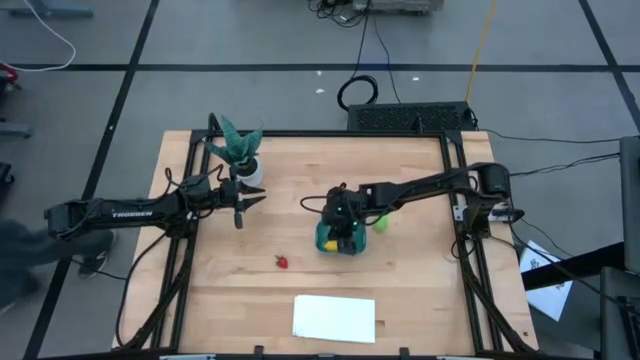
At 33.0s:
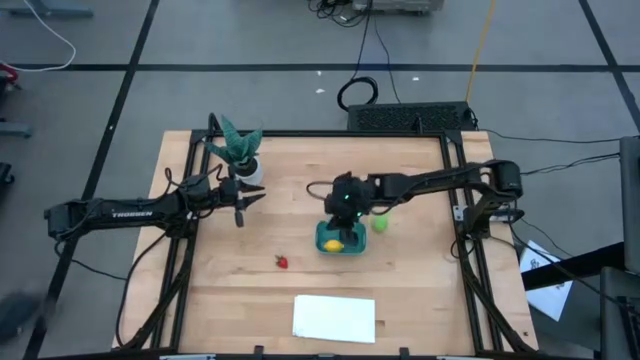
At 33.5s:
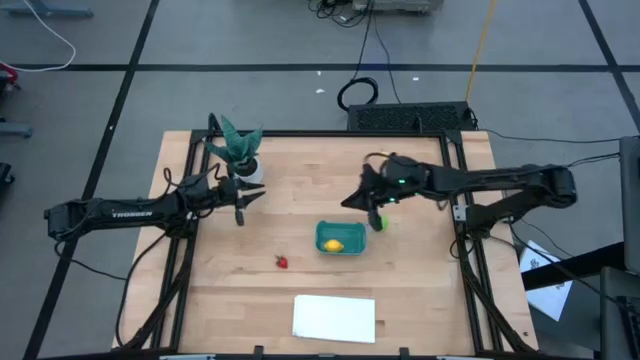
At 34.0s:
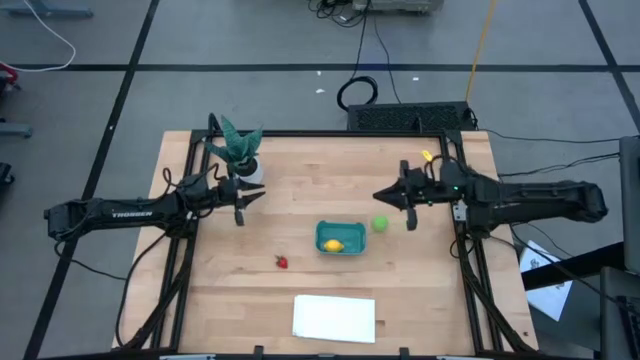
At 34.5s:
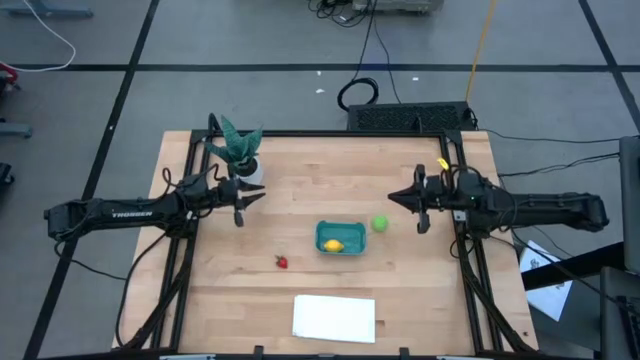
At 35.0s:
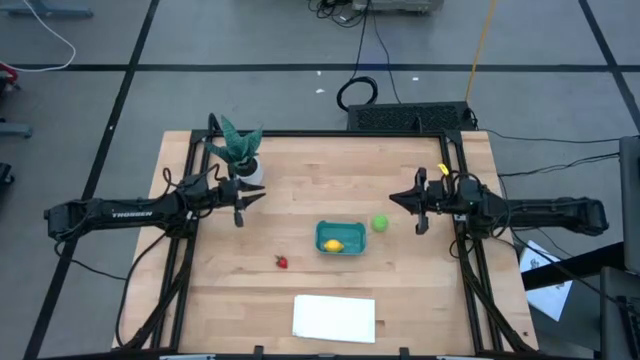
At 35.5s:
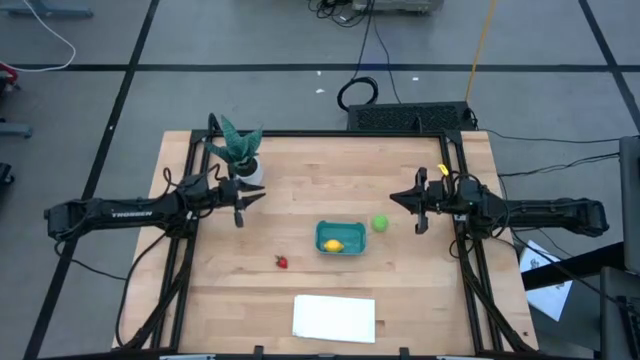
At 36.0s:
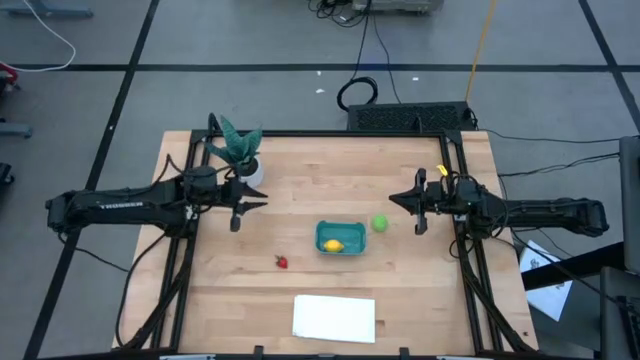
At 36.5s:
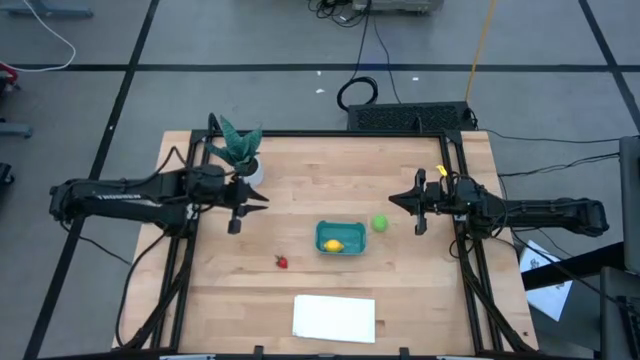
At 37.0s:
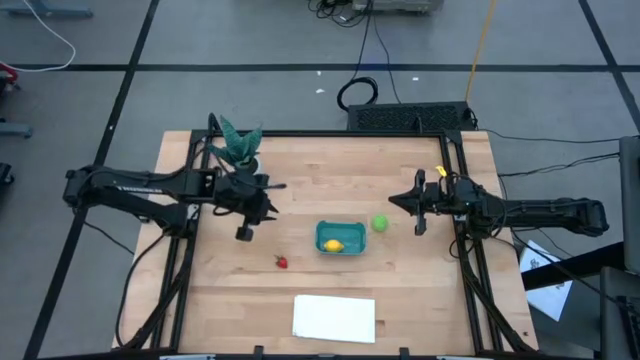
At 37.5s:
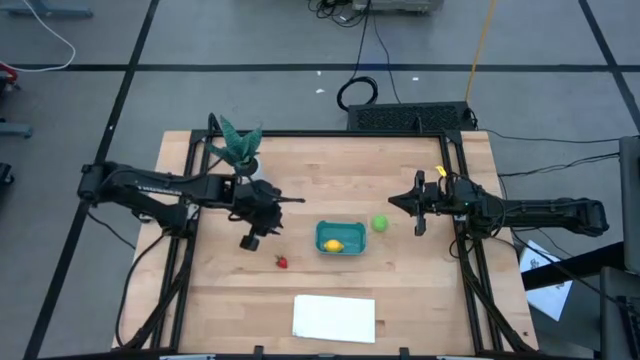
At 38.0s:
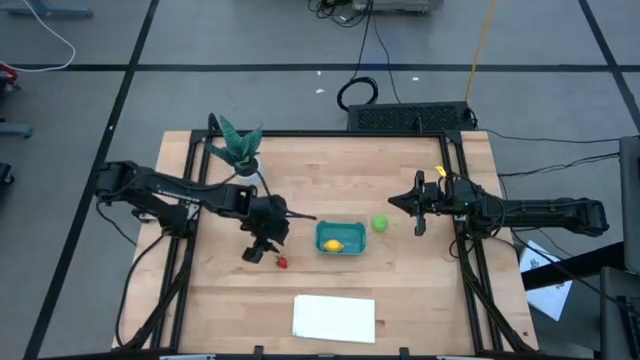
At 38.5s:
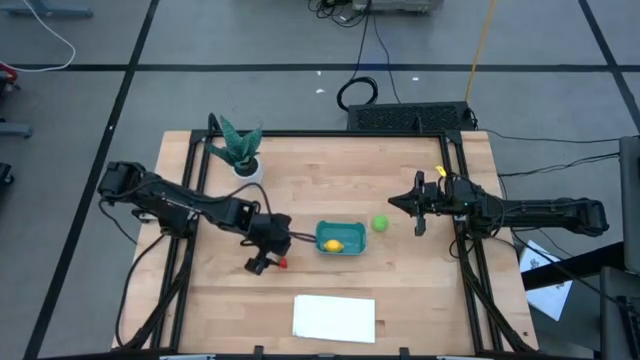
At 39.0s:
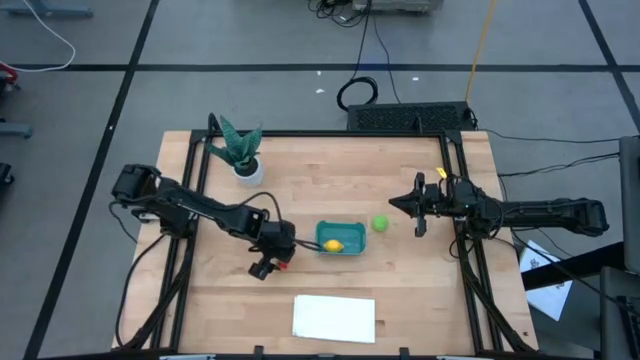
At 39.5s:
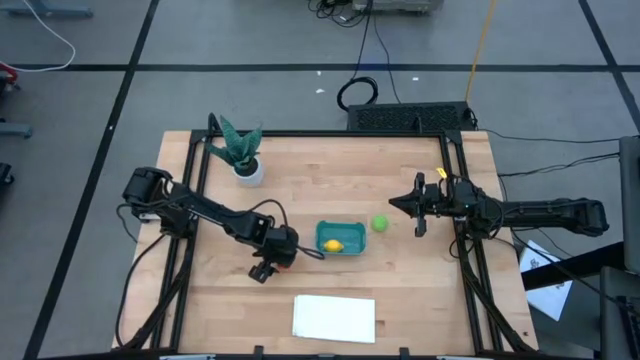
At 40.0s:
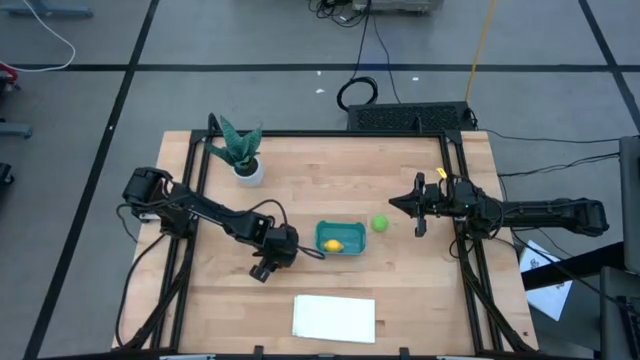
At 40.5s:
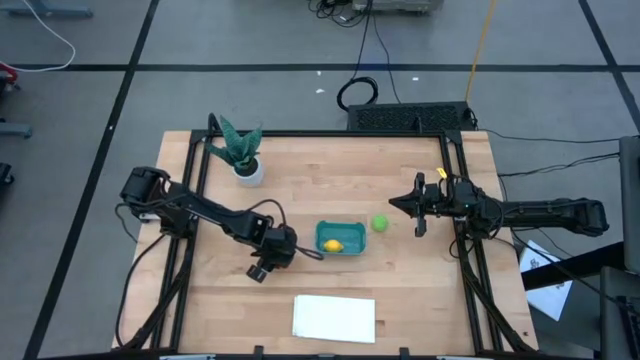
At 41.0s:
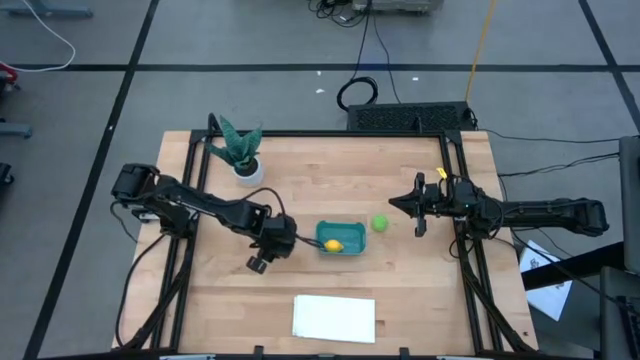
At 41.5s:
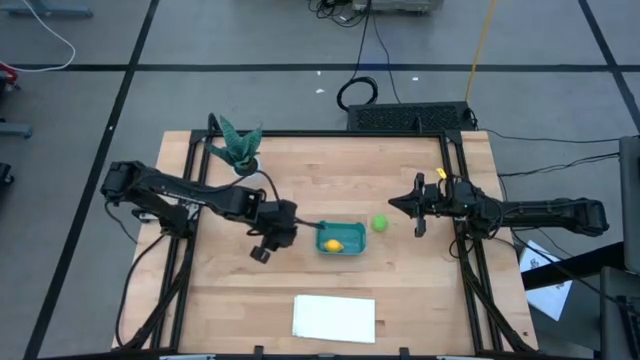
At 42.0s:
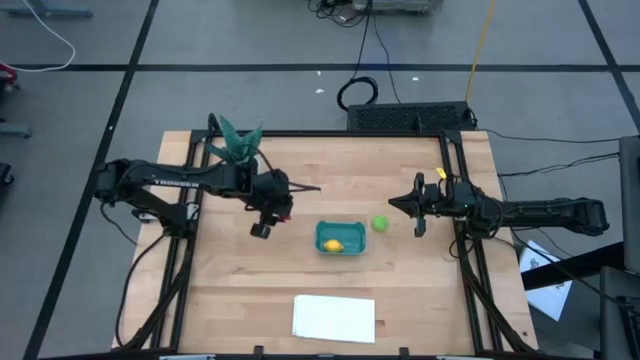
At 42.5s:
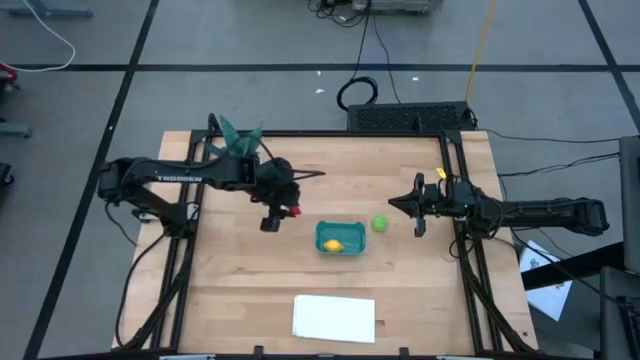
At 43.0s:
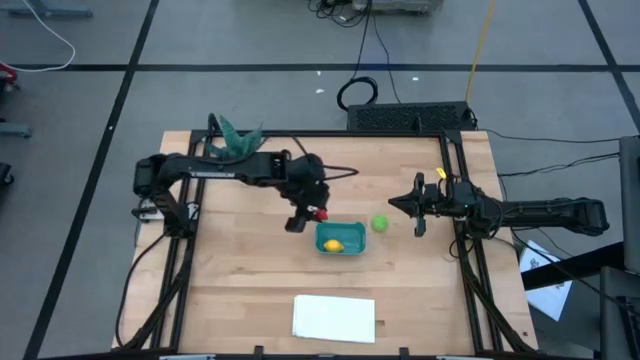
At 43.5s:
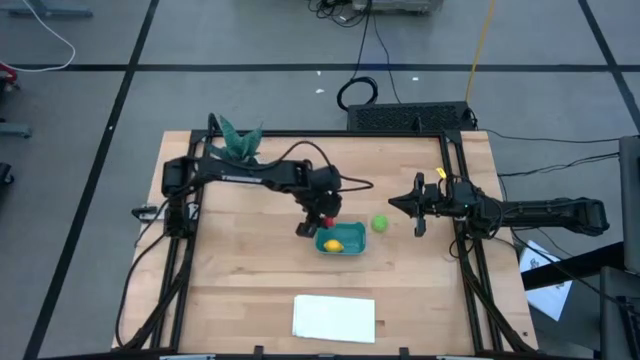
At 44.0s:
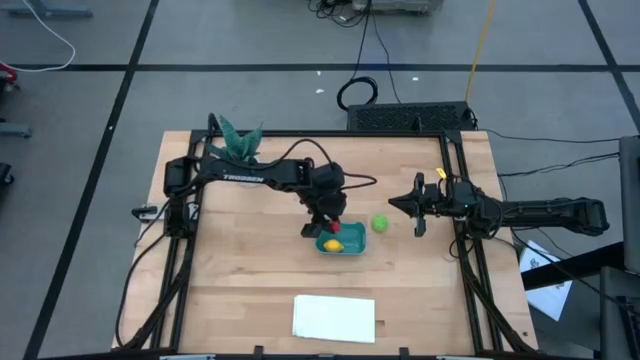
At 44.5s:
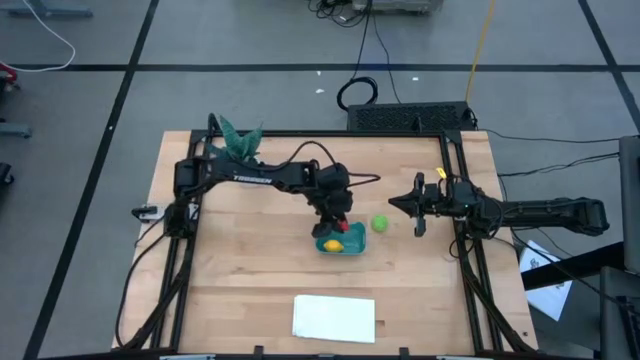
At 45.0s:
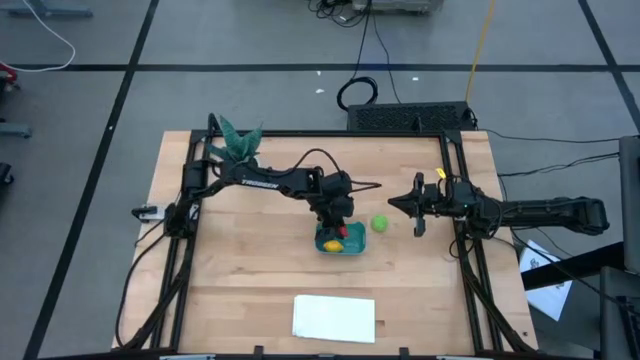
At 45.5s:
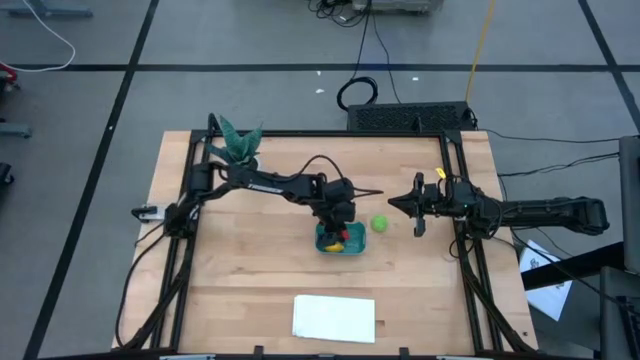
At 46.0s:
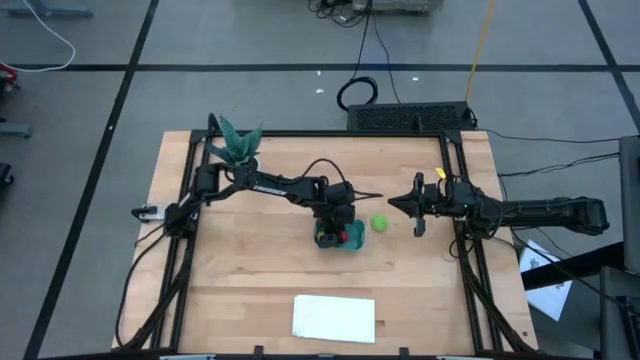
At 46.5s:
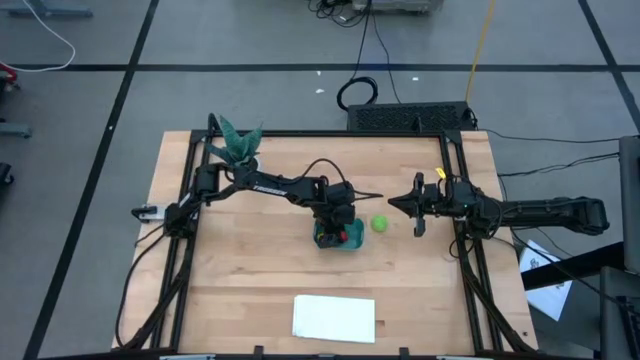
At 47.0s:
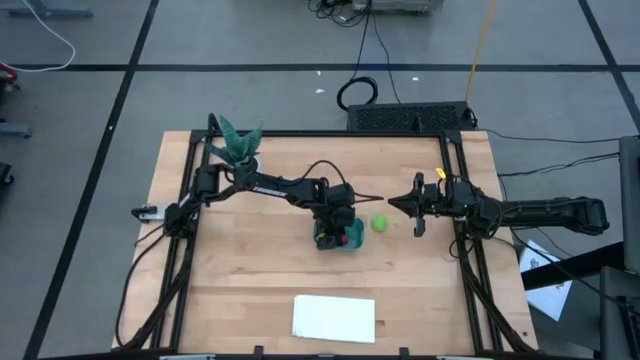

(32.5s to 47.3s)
Task: Pick and placing Produce into tupperware
Put the red strawberry into the blue bin

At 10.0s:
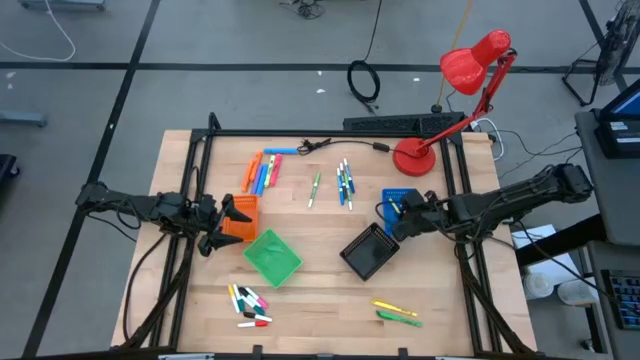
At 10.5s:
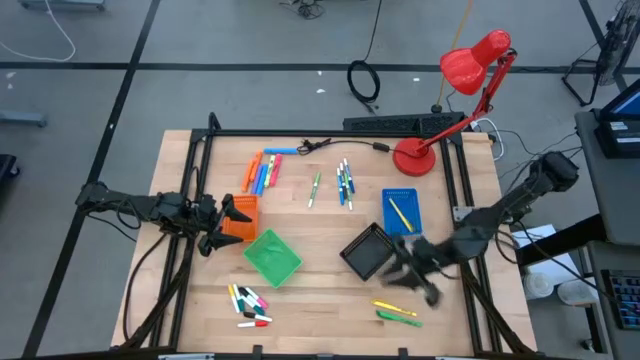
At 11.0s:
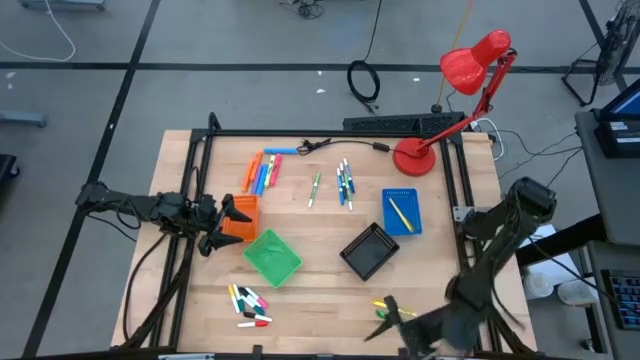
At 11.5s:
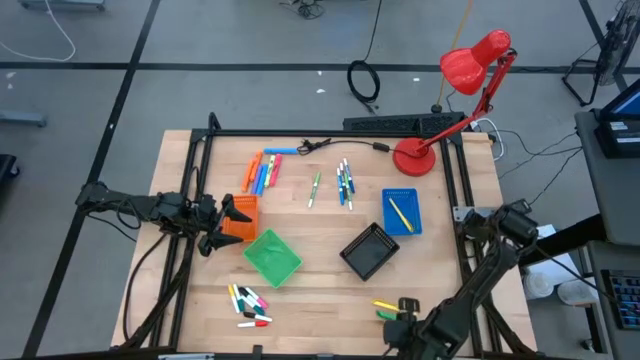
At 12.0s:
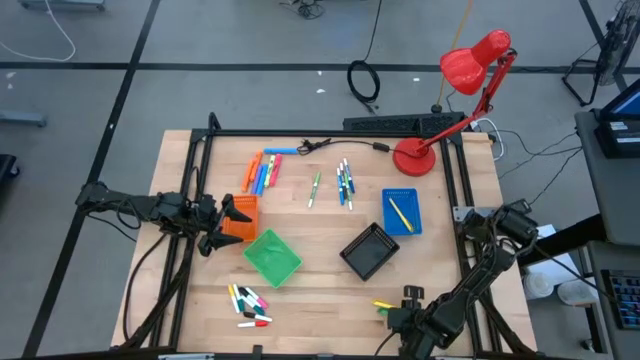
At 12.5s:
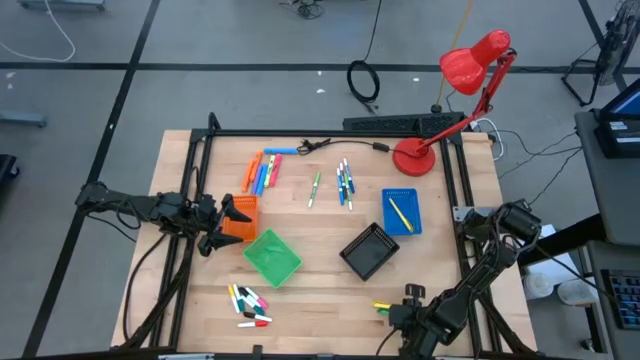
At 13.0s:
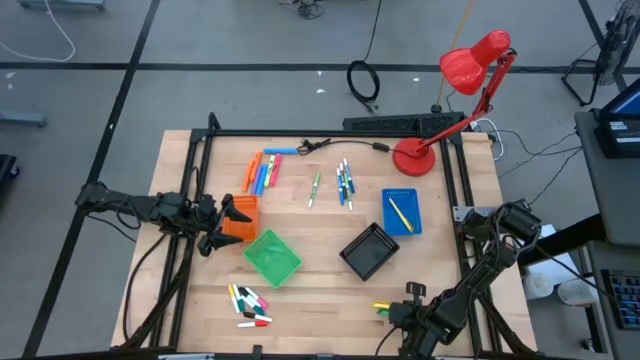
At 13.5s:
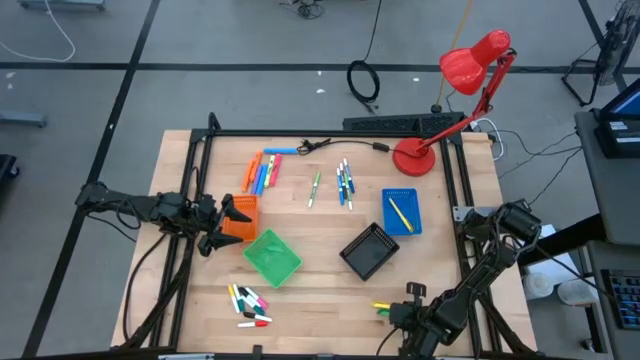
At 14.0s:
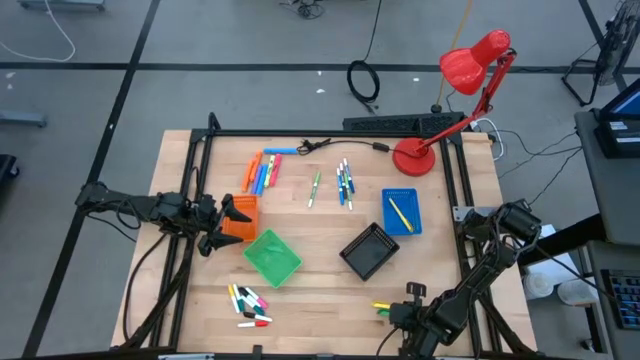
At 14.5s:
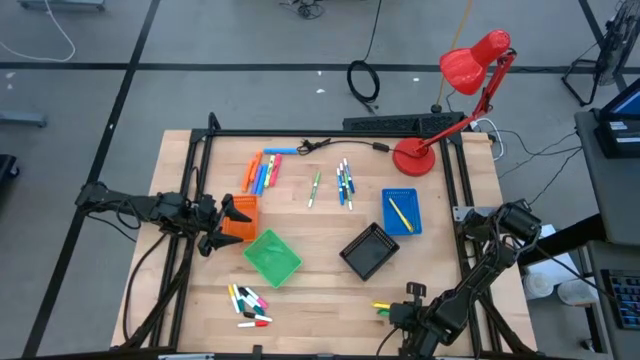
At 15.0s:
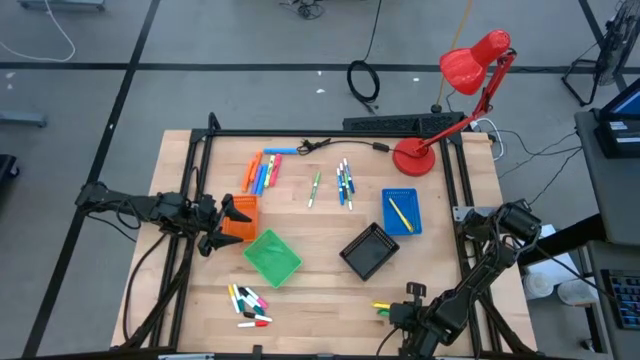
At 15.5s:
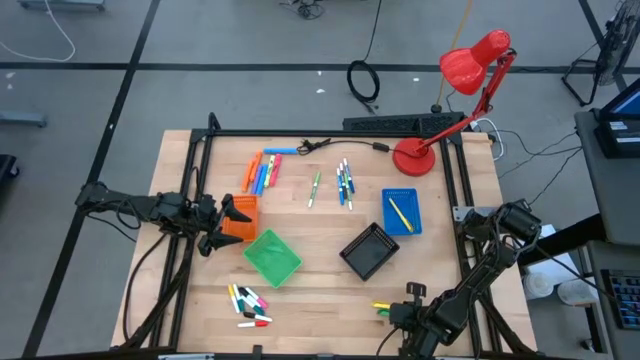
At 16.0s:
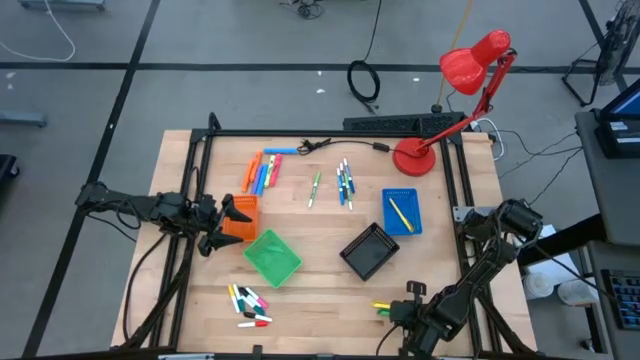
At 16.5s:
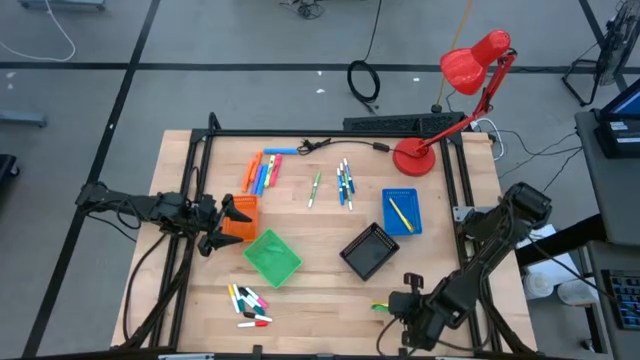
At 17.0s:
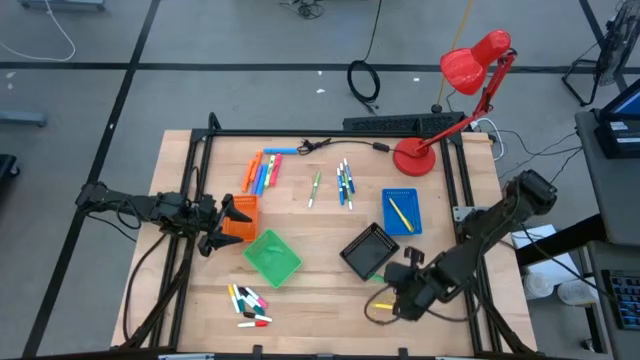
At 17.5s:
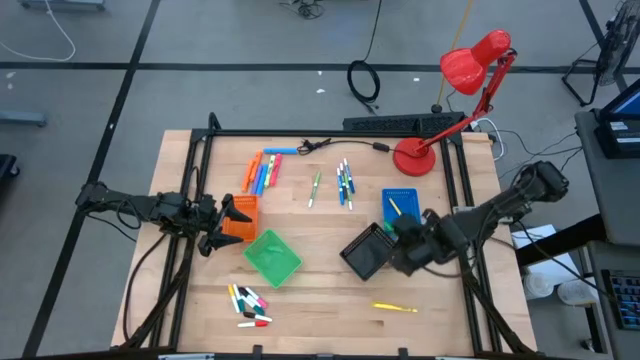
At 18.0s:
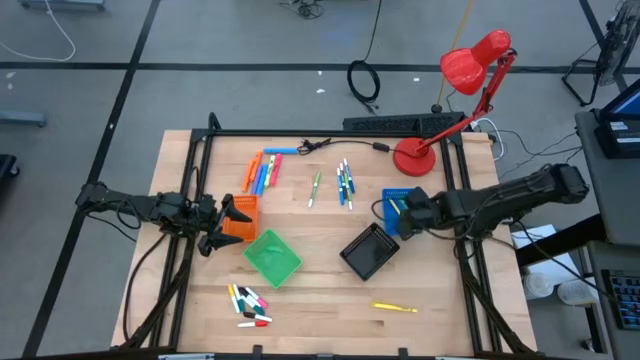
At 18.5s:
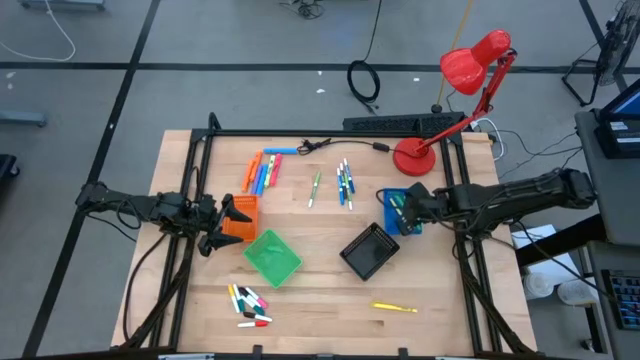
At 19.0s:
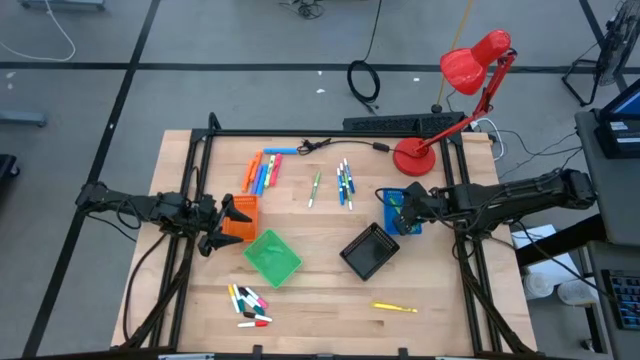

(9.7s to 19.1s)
Task: Pick & Place Markers
Put the green pen into the blue basket
